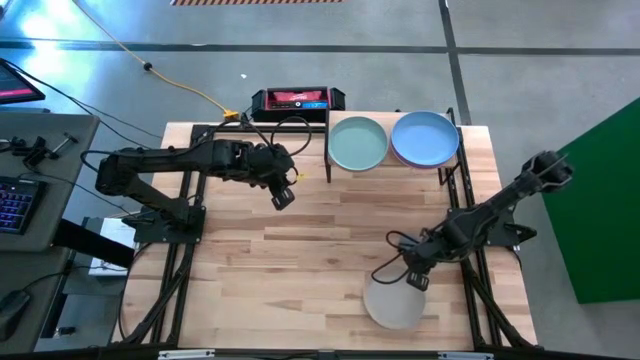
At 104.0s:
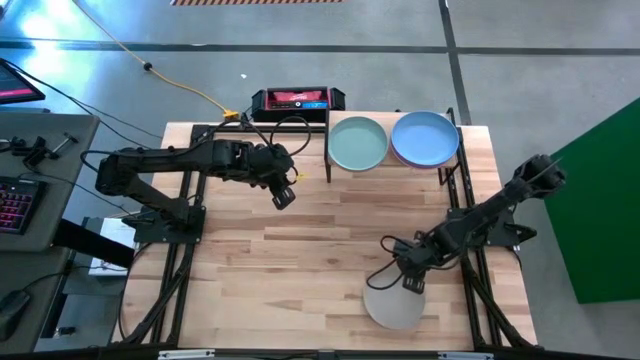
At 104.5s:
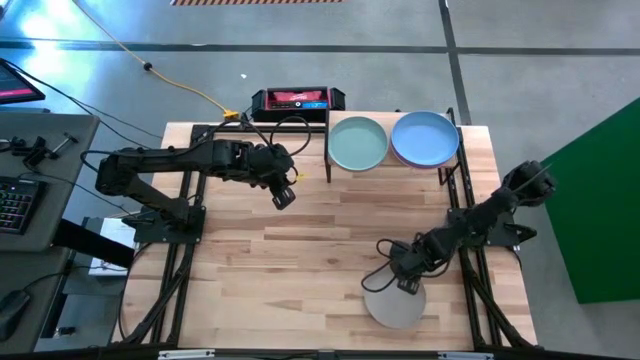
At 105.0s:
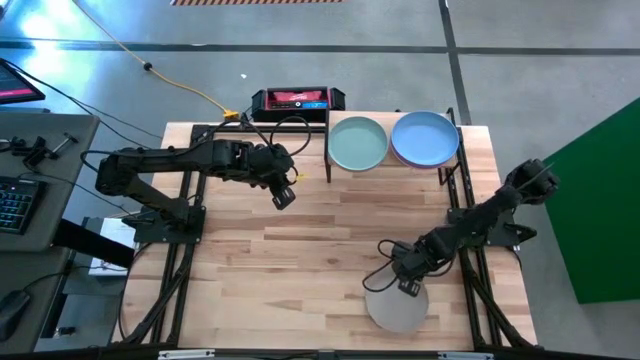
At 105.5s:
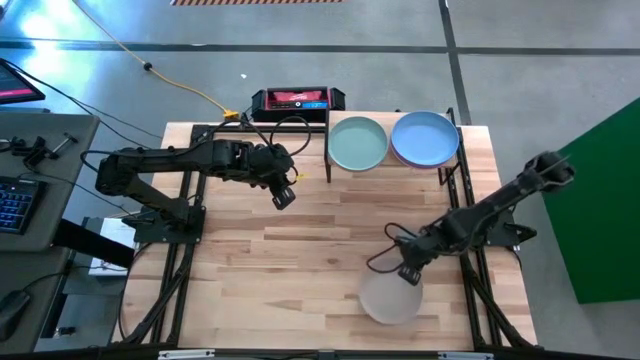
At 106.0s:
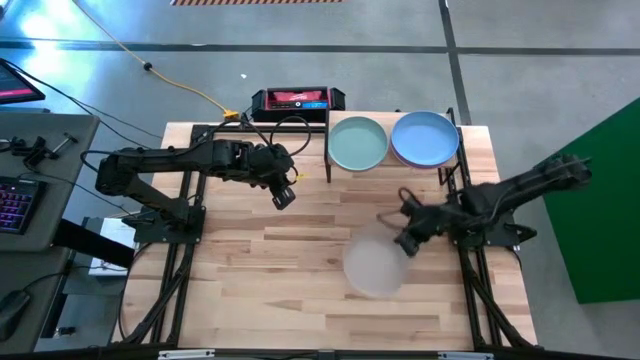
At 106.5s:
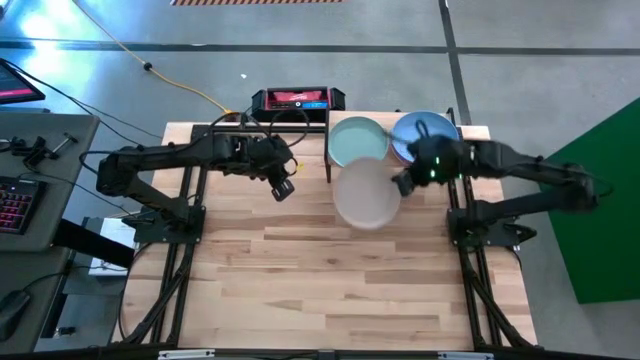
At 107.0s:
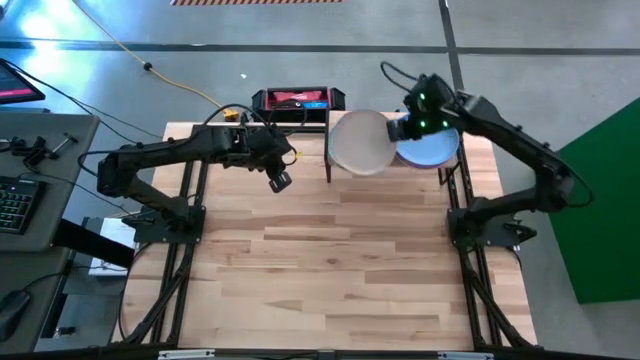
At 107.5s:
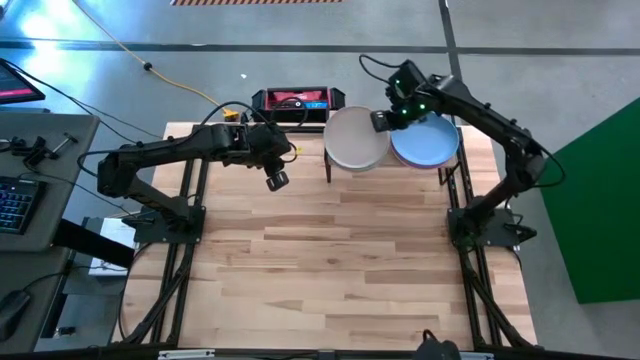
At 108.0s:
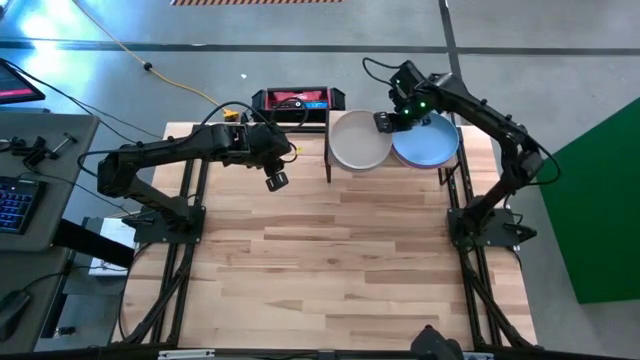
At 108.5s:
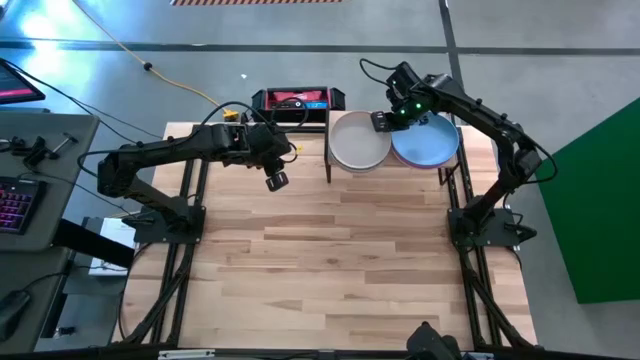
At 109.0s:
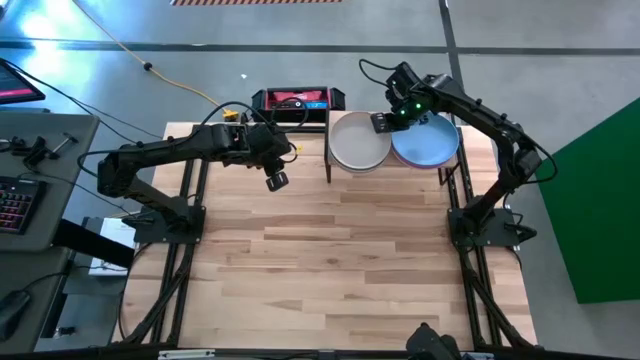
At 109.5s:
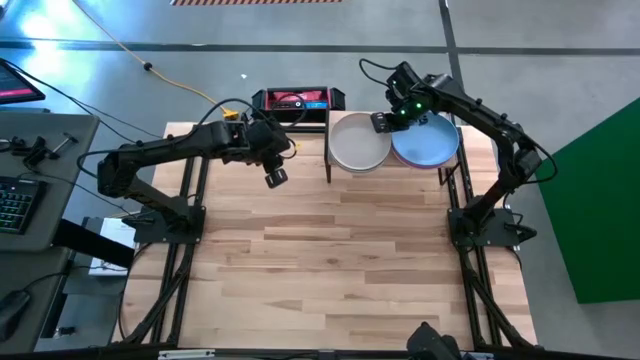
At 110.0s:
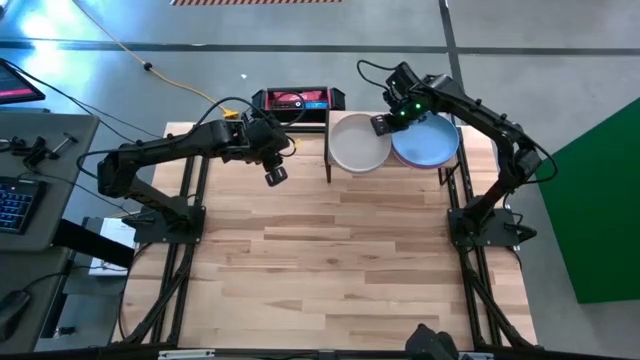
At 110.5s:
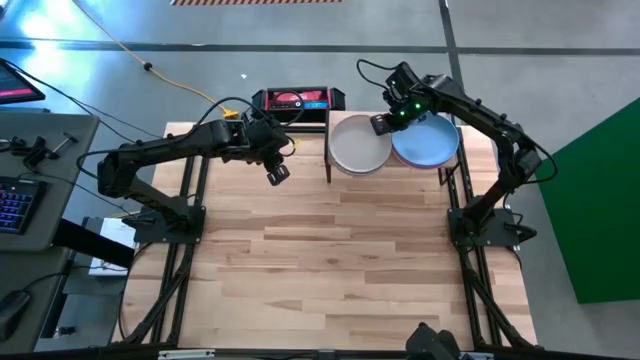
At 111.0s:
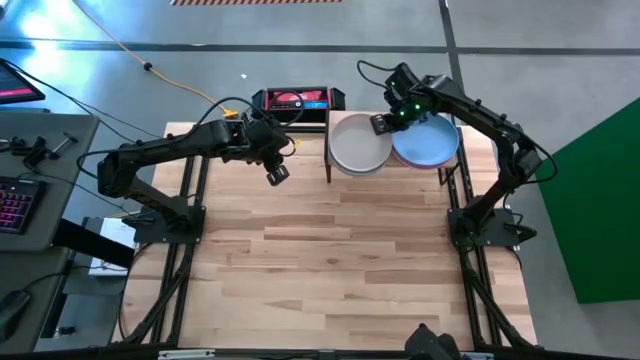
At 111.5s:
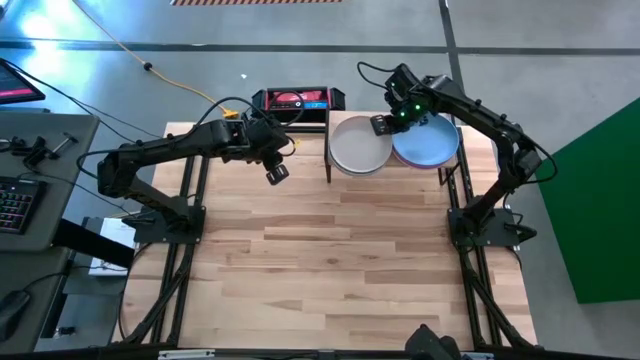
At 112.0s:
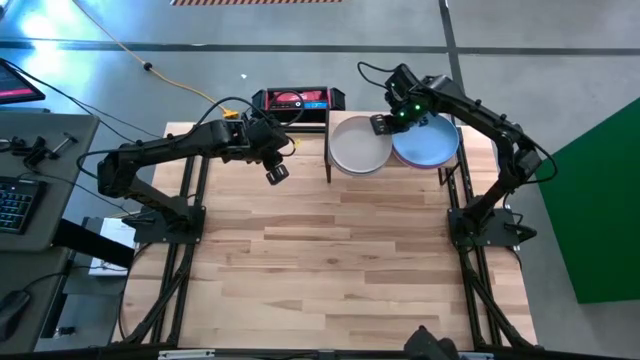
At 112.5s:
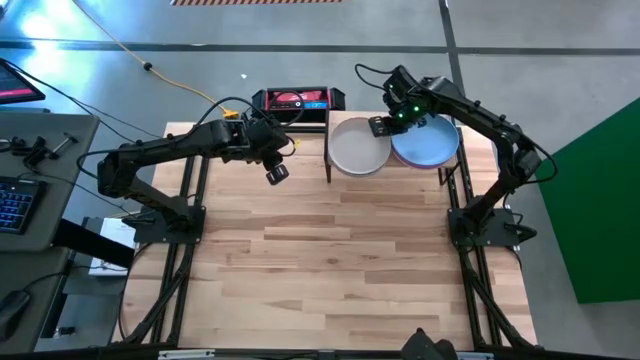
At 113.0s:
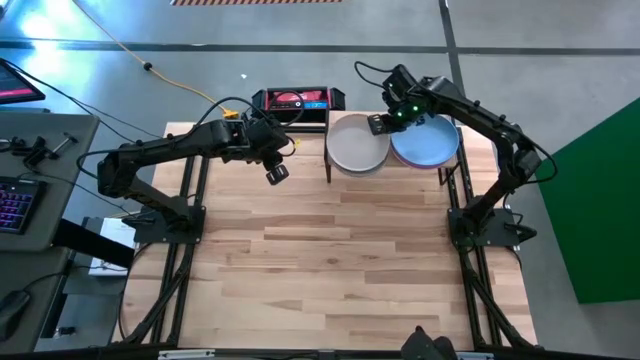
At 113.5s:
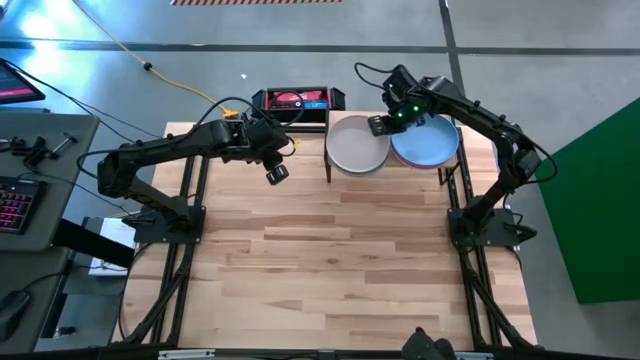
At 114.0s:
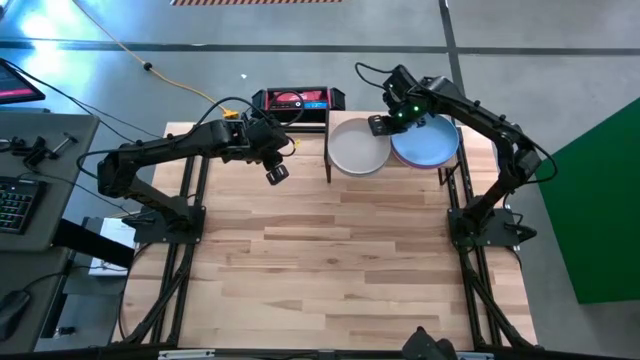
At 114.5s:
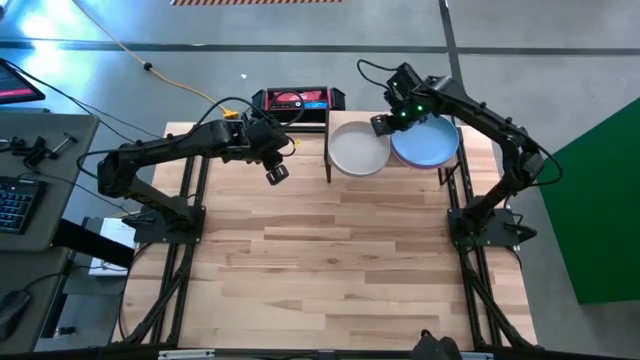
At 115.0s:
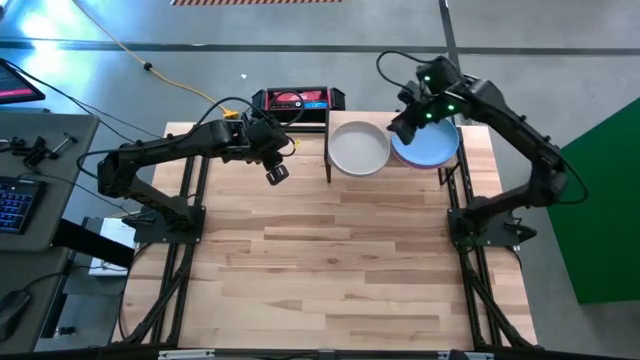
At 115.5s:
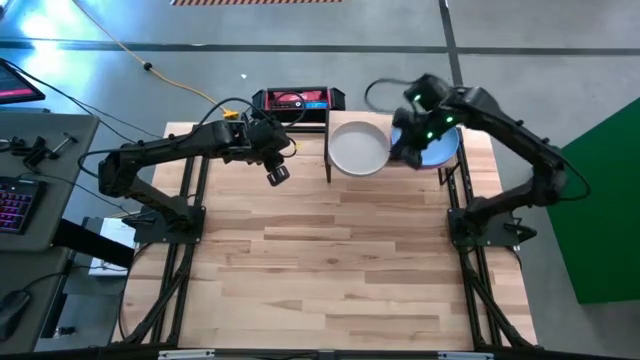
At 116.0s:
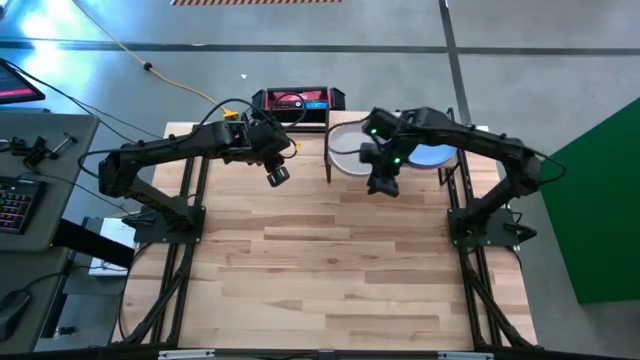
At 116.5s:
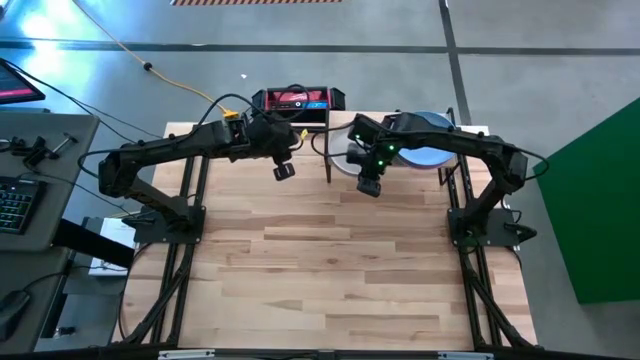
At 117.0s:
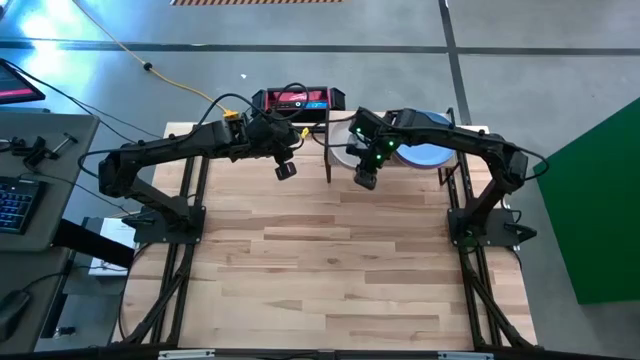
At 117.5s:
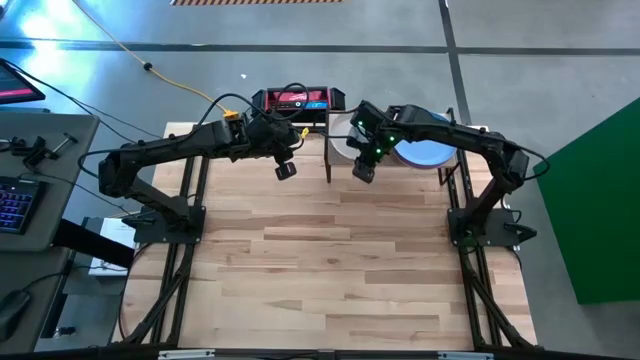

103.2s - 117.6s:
Task: Place and stack plates onto a shelf
Stack the gray plate on top of the light blue plate on the shelf

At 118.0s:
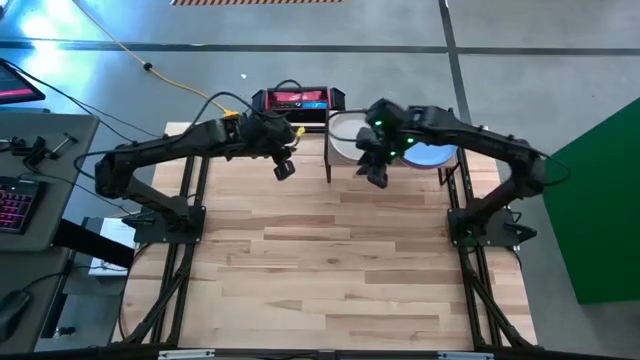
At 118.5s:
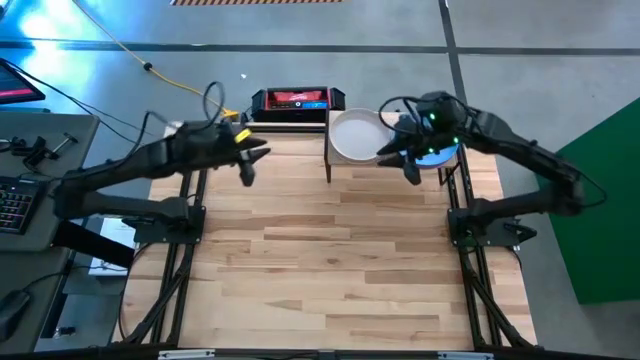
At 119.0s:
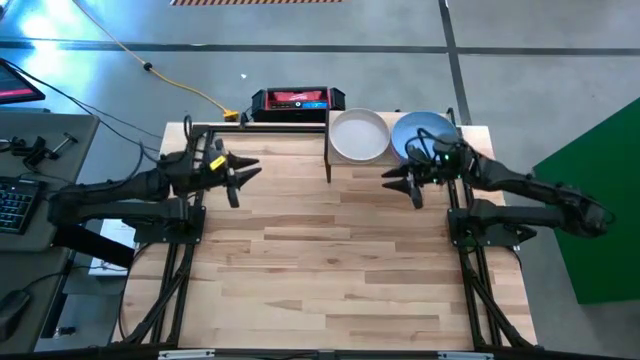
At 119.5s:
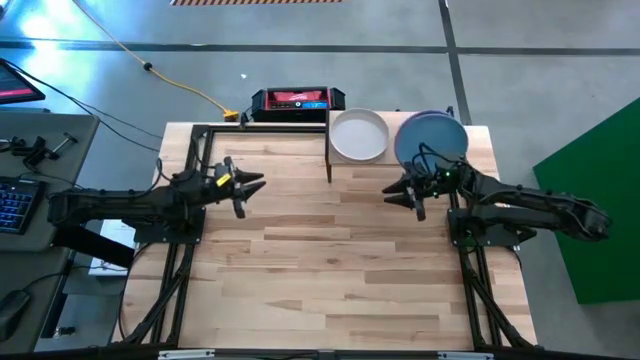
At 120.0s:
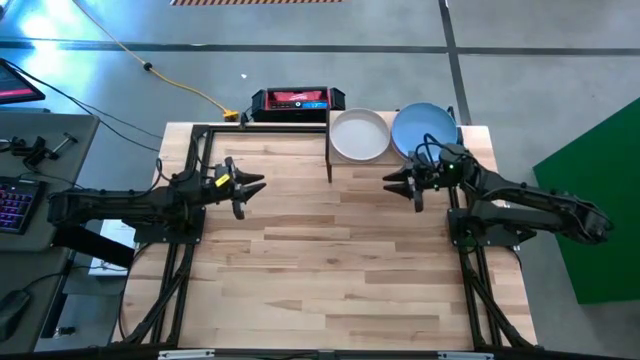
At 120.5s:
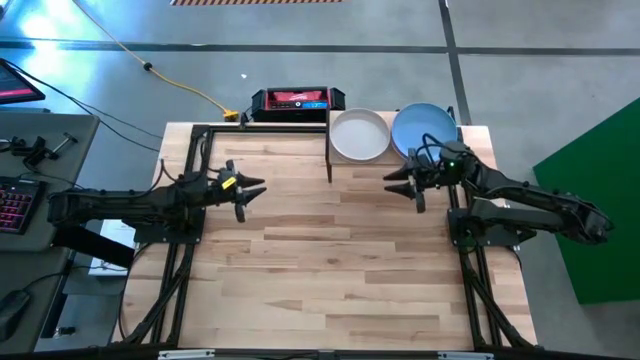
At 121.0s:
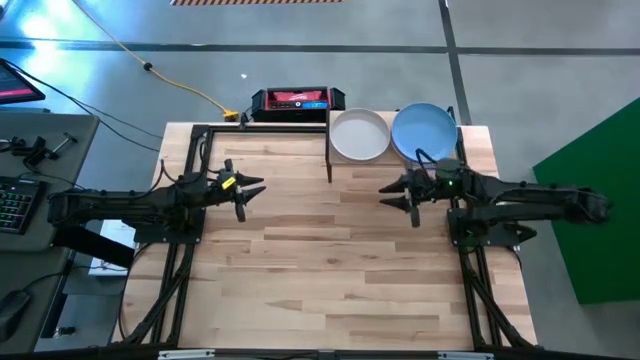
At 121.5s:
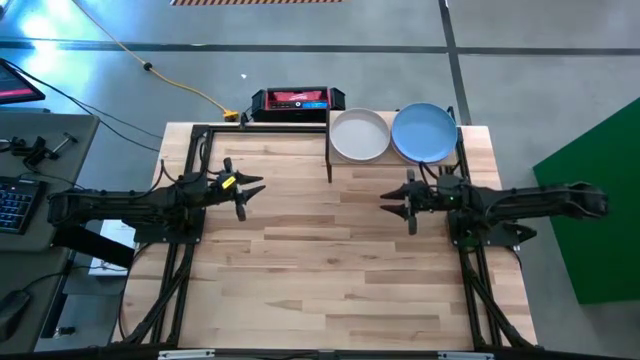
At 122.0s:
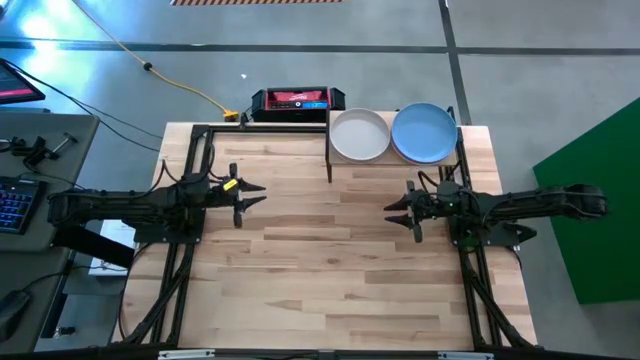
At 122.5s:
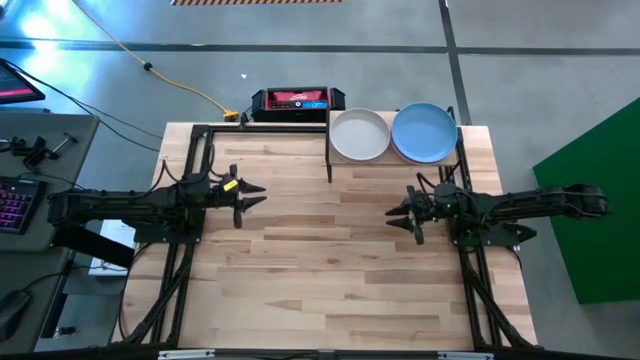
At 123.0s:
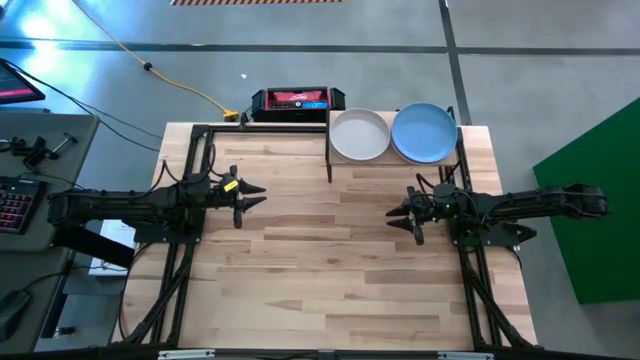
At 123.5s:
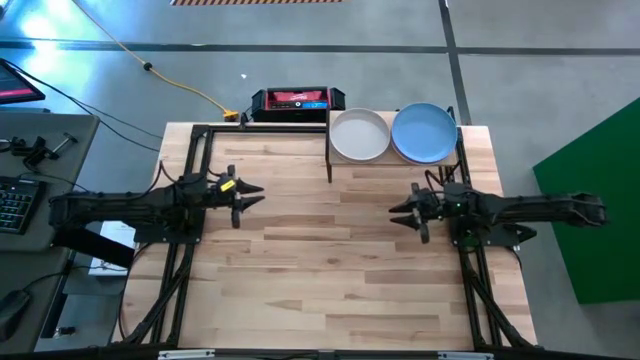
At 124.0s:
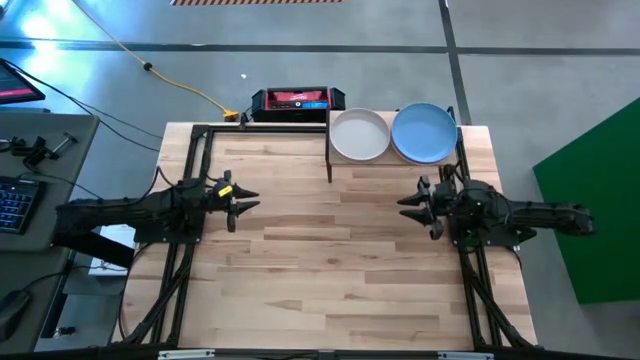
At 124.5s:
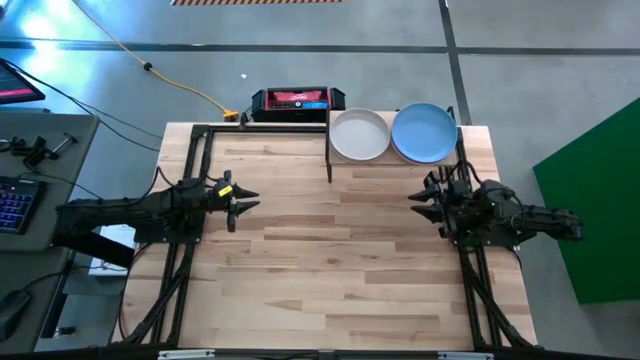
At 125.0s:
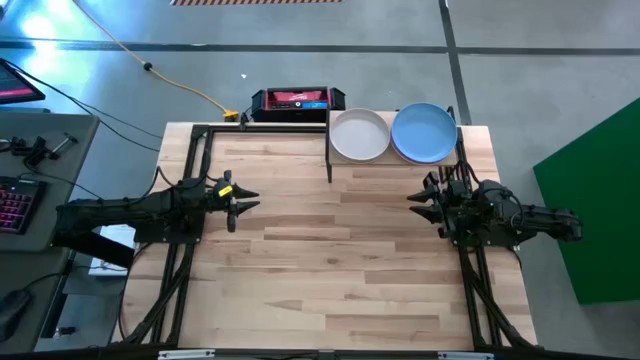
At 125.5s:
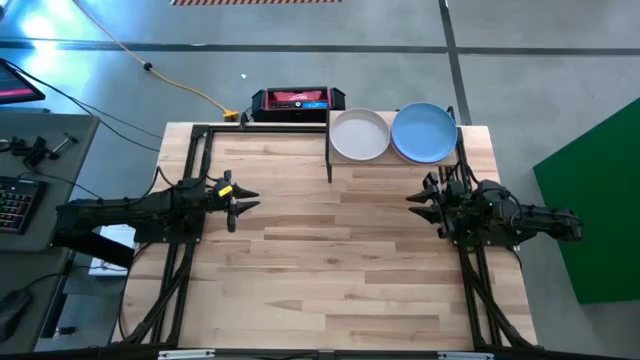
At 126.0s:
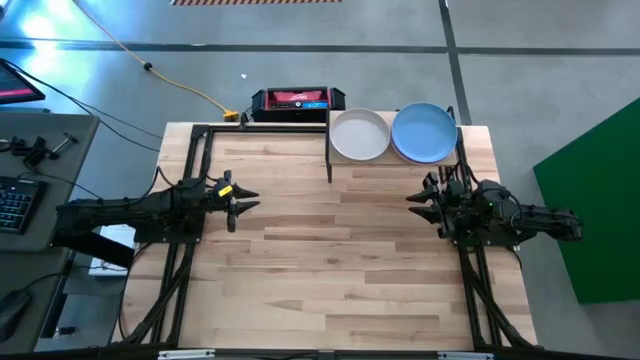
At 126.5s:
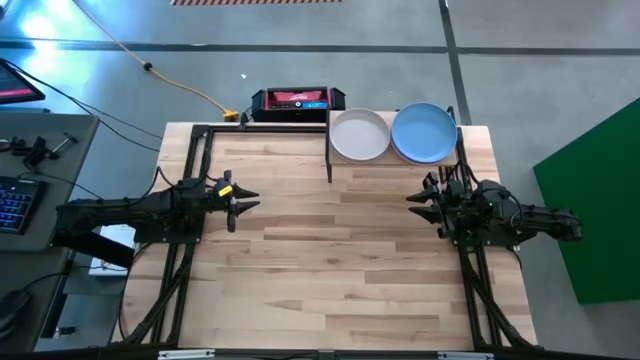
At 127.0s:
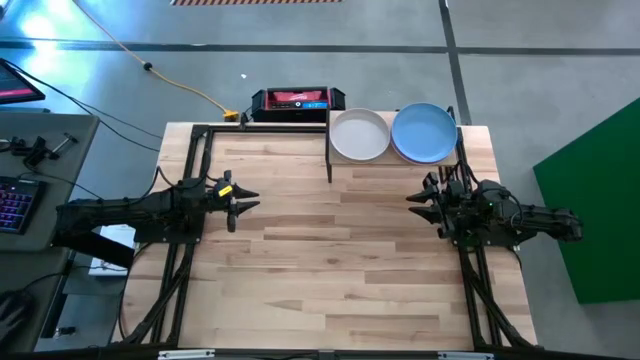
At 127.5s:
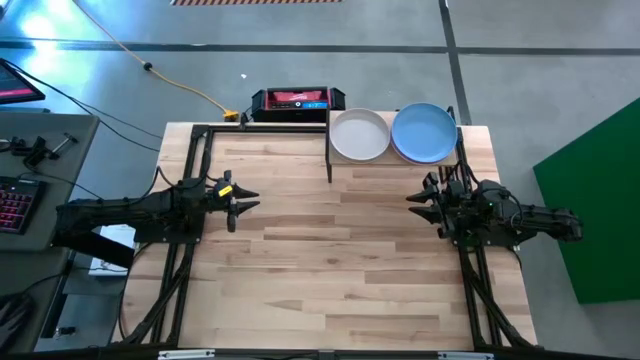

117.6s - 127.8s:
Return to Home Position
